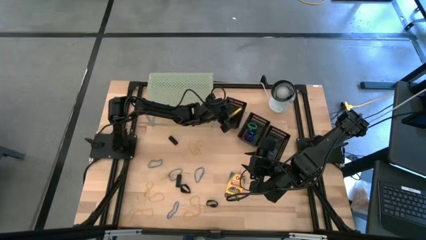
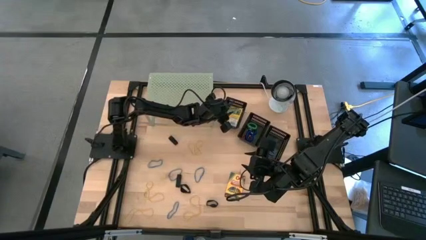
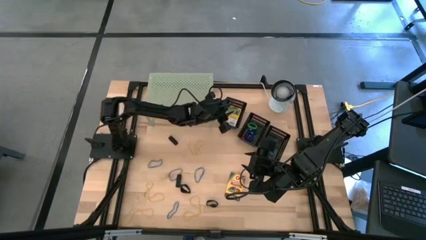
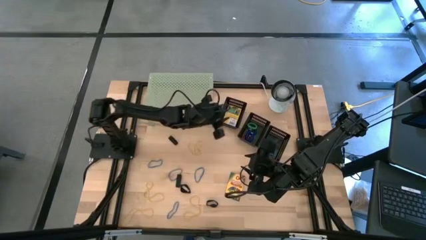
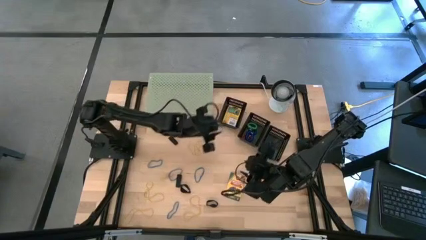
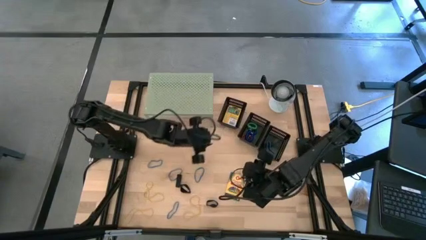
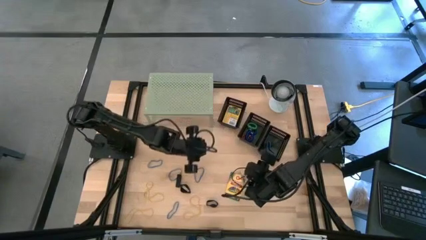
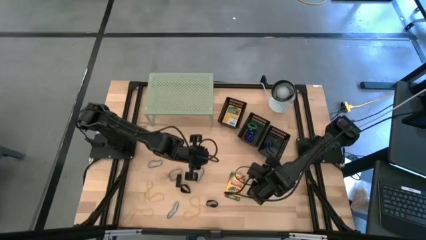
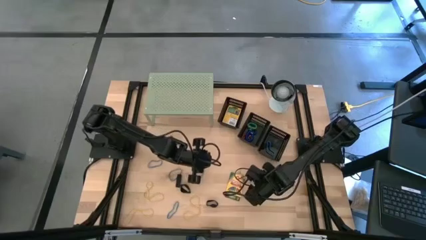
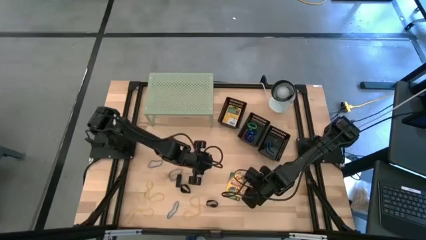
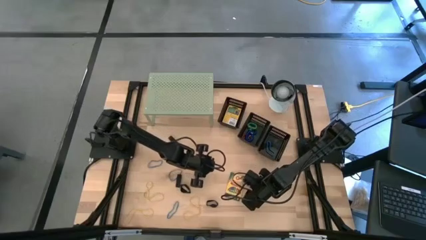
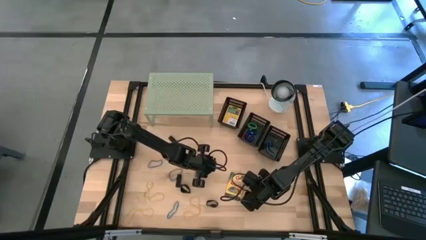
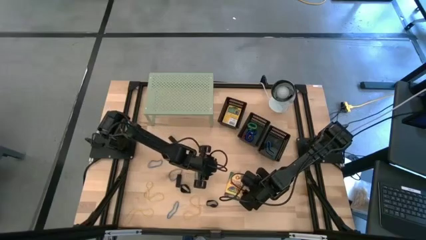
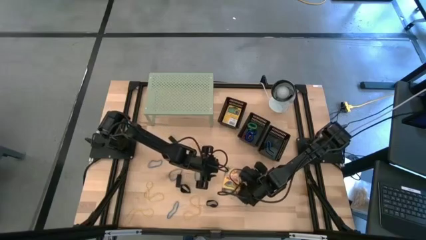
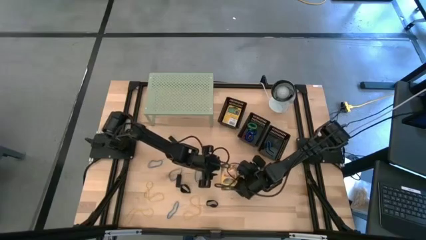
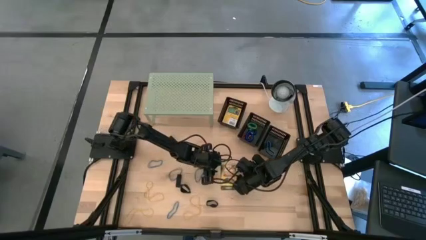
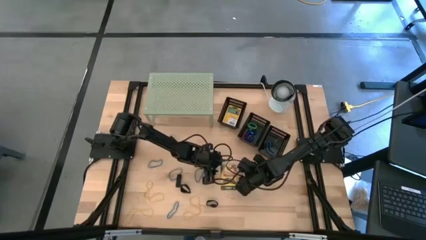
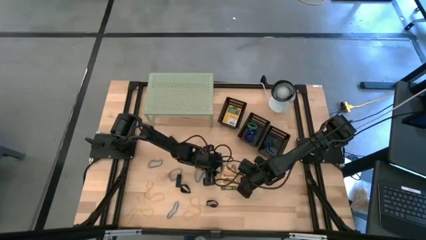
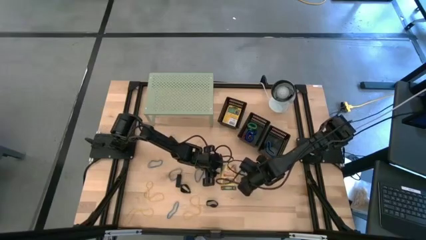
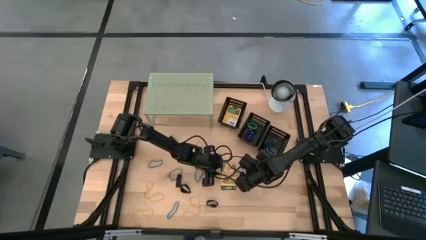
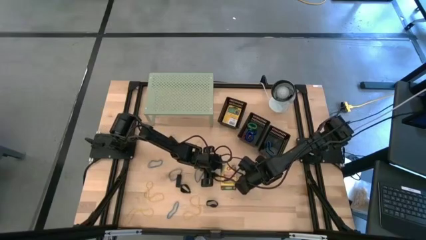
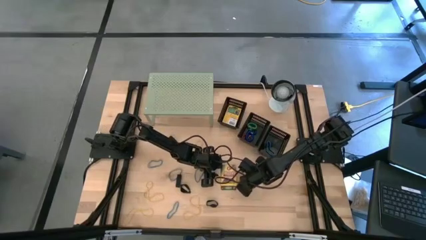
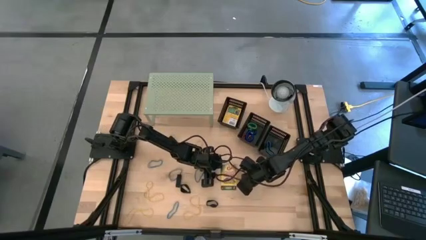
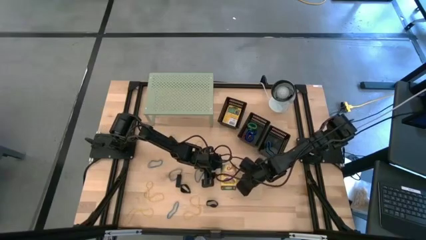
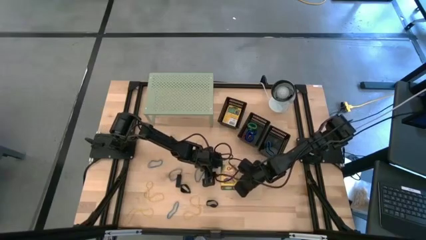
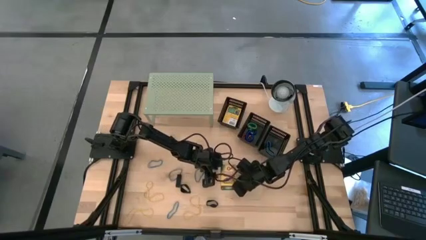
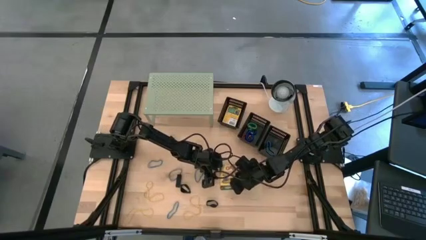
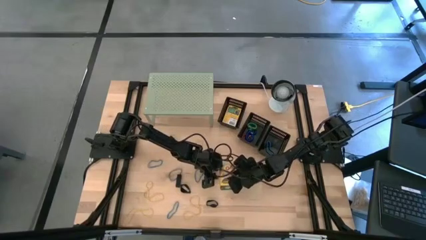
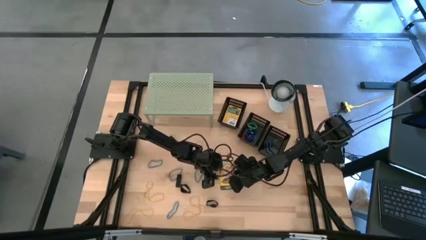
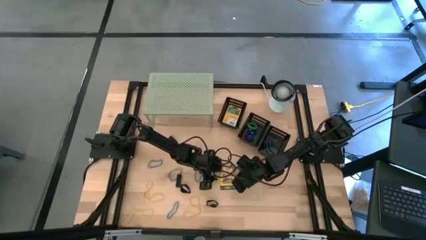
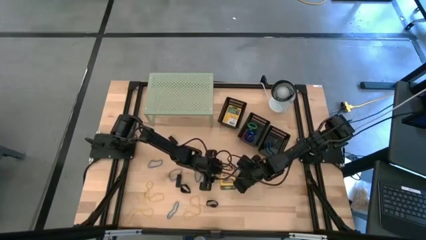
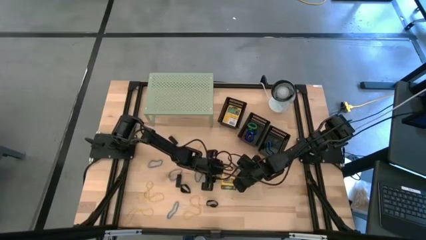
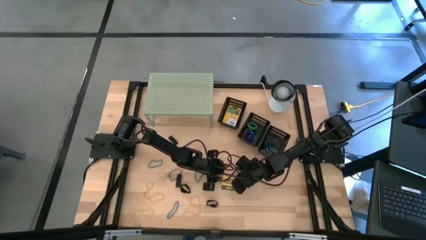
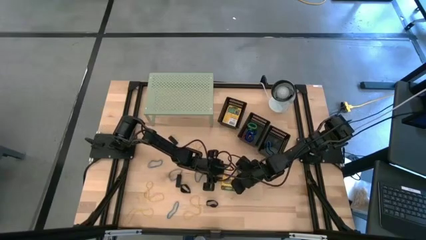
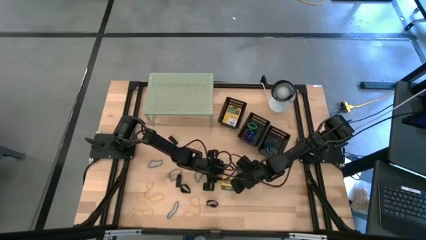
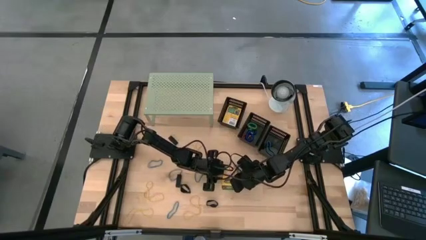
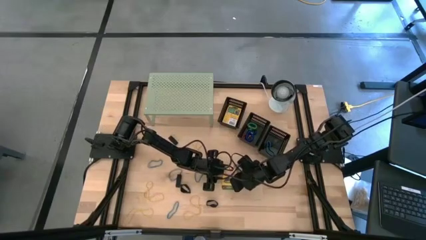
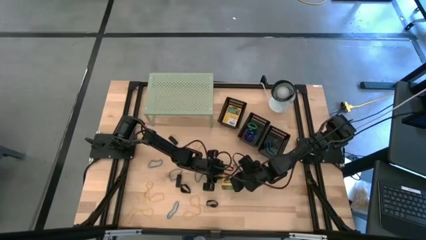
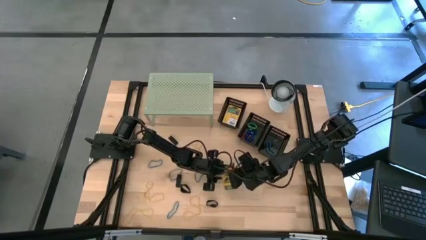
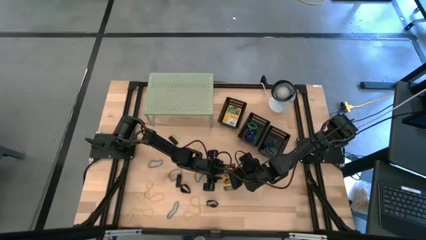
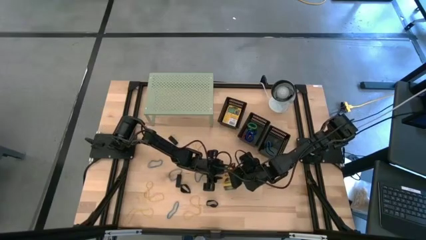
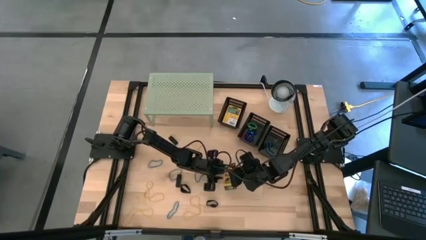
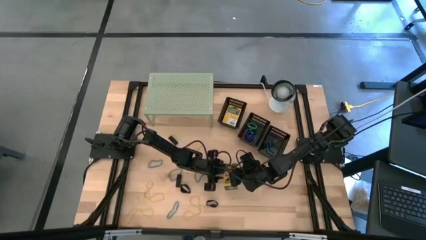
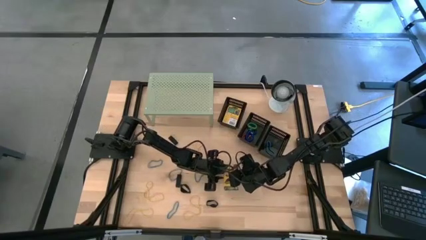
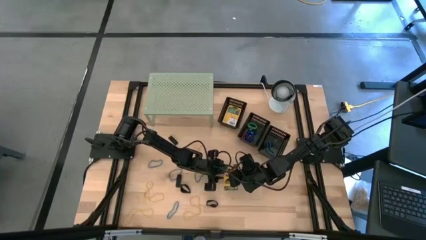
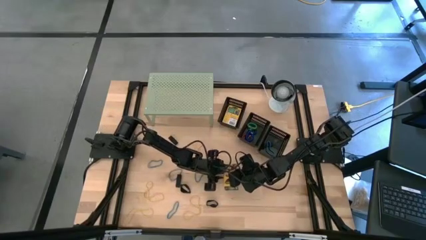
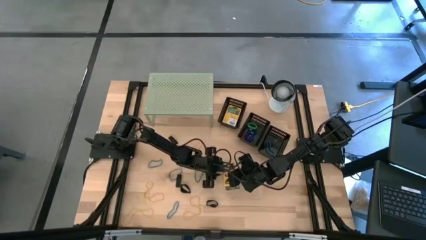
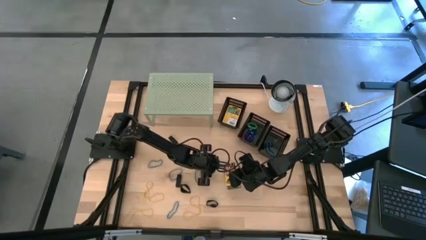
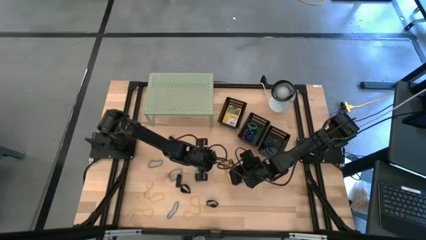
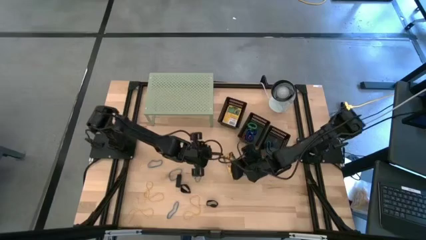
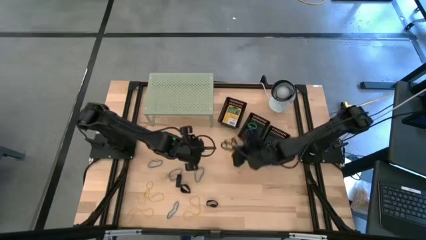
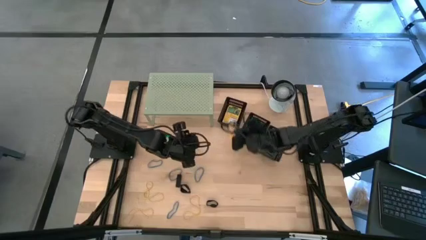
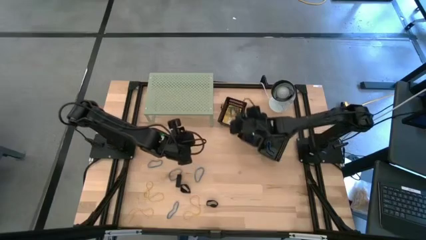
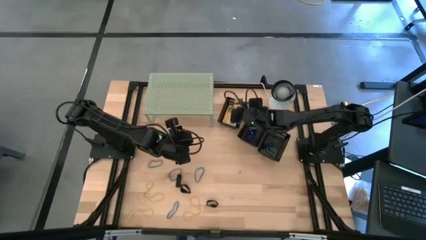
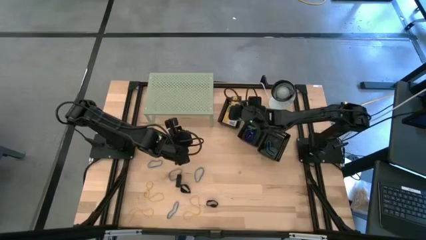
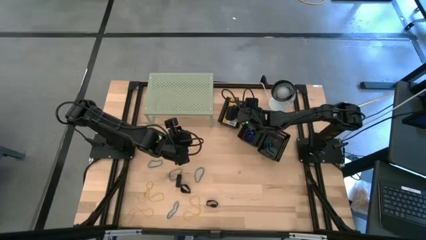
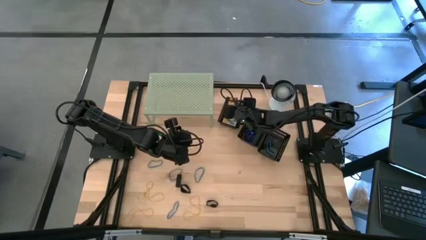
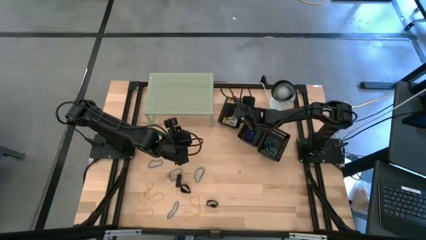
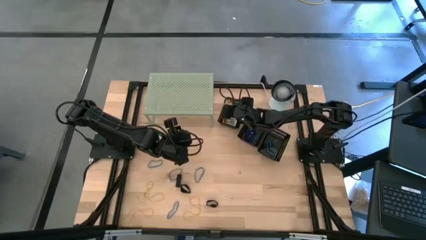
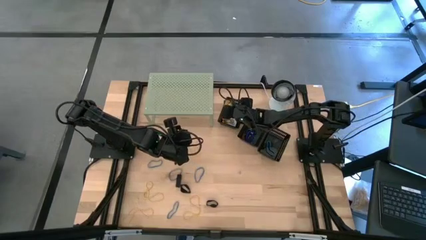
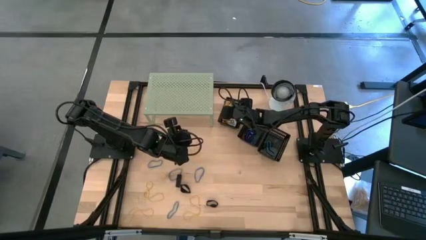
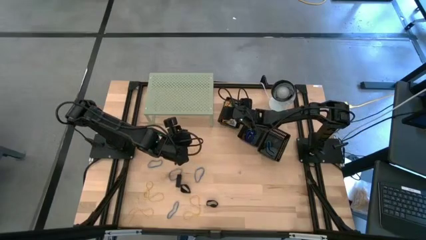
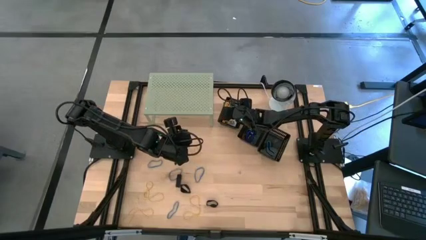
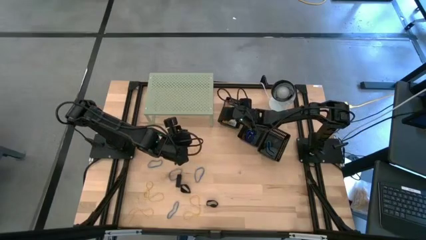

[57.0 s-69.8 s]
Task: Pick & Place Office Desk Supplies
Put the crayon box into the top black bin
